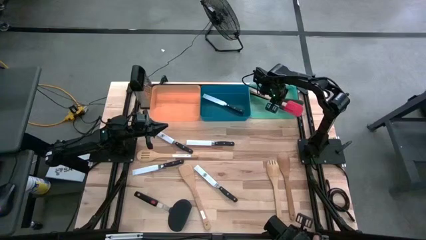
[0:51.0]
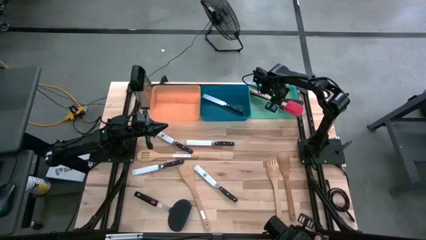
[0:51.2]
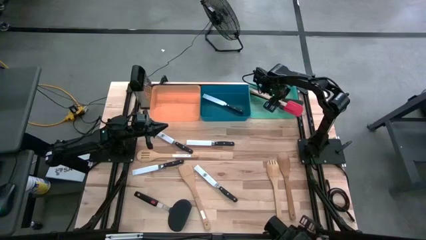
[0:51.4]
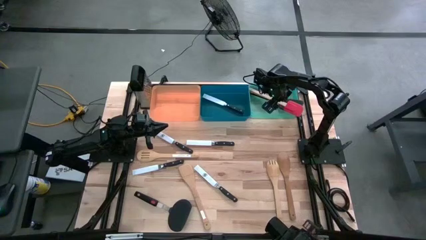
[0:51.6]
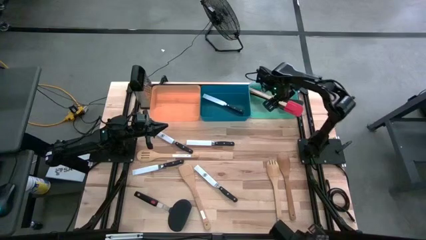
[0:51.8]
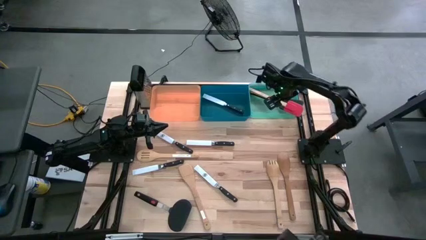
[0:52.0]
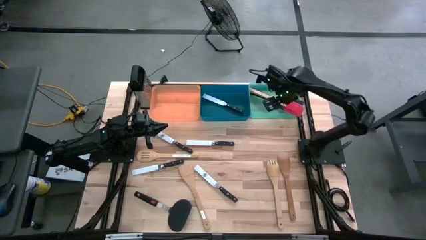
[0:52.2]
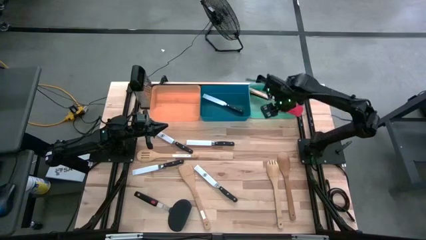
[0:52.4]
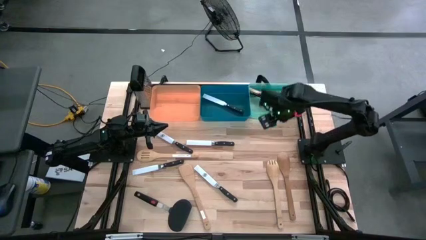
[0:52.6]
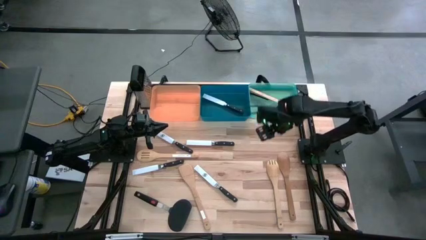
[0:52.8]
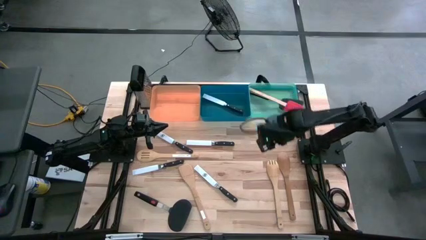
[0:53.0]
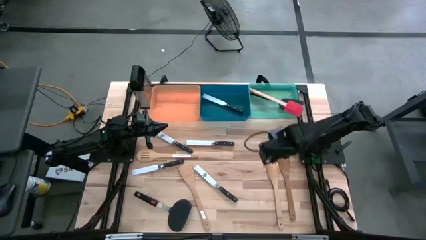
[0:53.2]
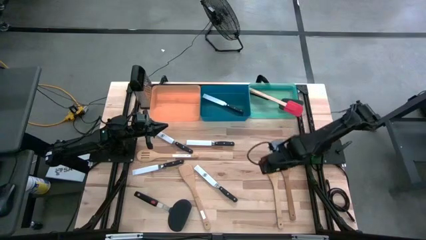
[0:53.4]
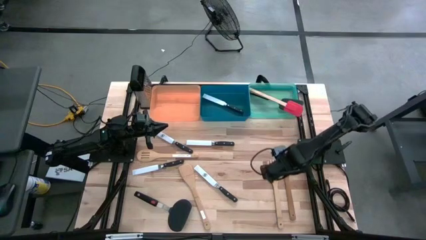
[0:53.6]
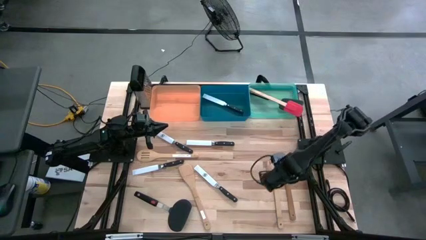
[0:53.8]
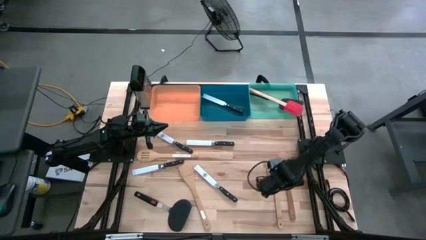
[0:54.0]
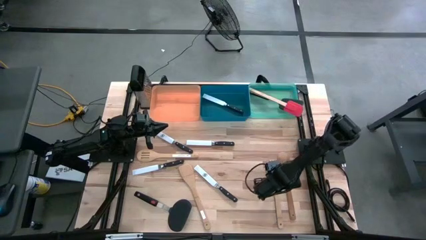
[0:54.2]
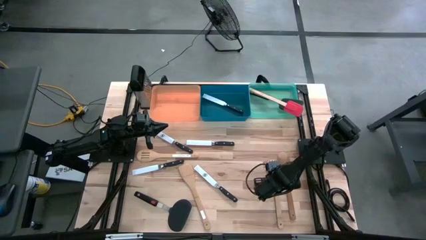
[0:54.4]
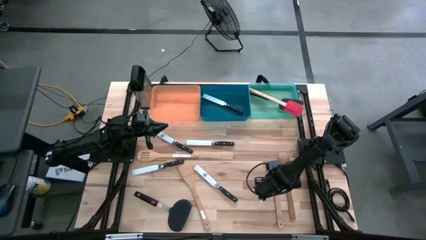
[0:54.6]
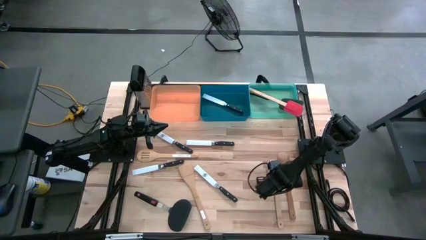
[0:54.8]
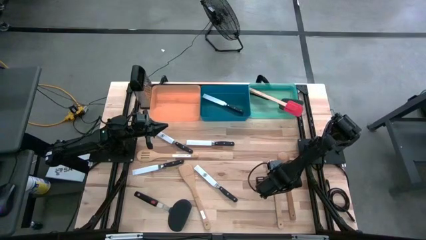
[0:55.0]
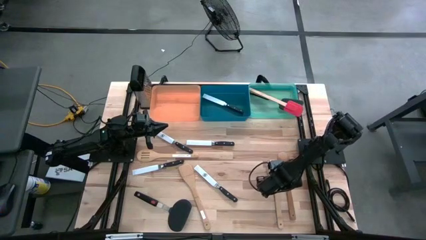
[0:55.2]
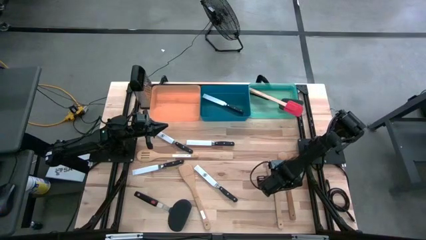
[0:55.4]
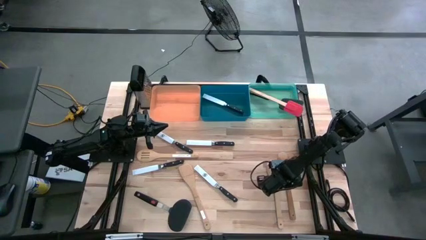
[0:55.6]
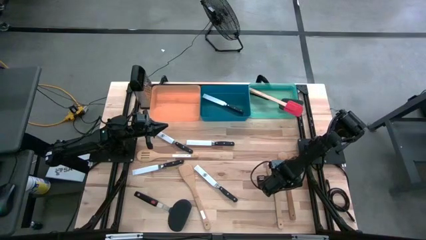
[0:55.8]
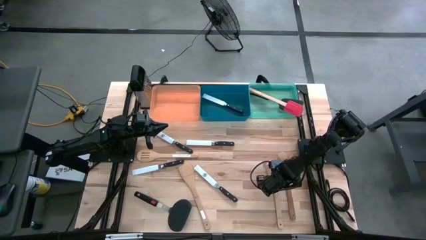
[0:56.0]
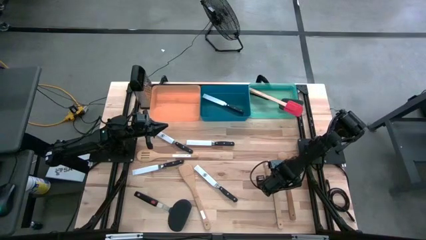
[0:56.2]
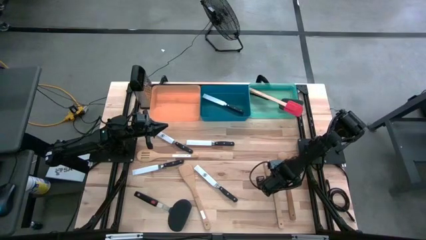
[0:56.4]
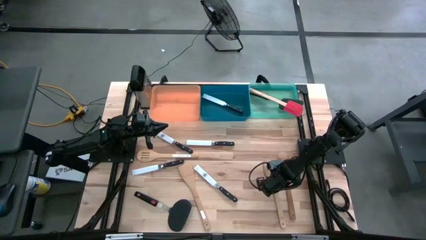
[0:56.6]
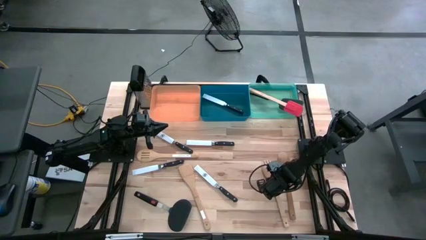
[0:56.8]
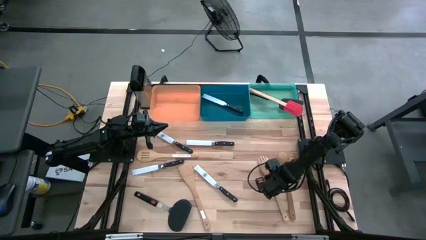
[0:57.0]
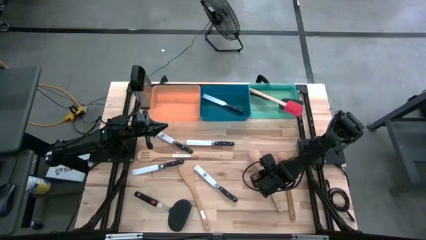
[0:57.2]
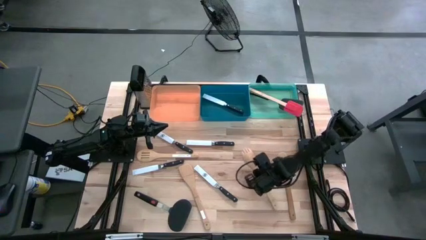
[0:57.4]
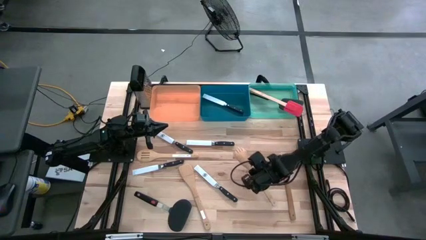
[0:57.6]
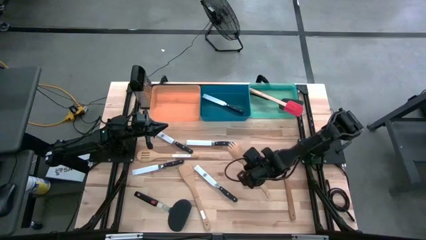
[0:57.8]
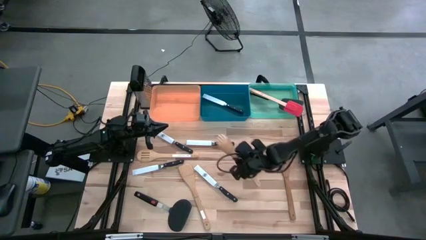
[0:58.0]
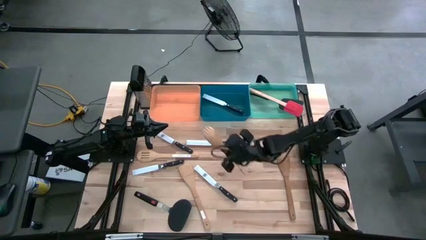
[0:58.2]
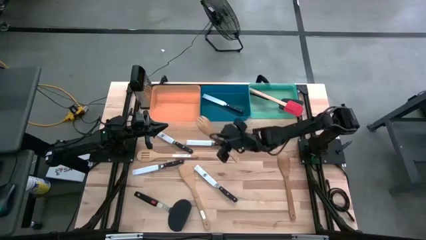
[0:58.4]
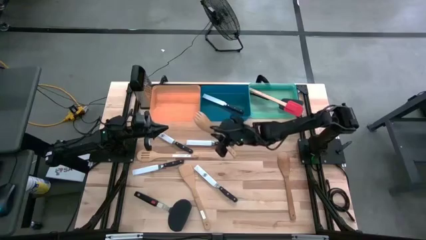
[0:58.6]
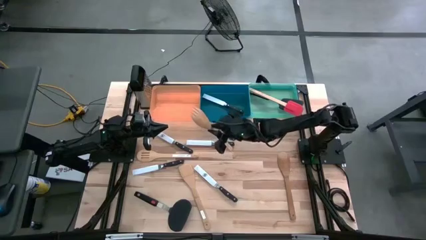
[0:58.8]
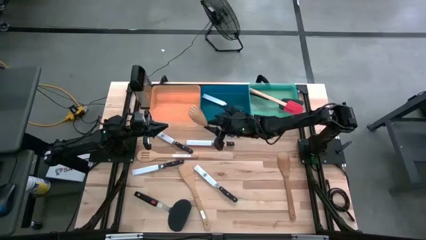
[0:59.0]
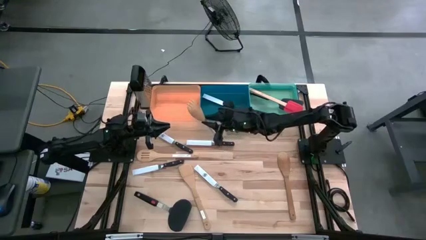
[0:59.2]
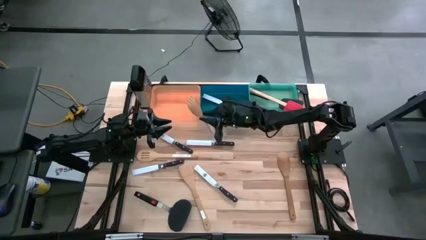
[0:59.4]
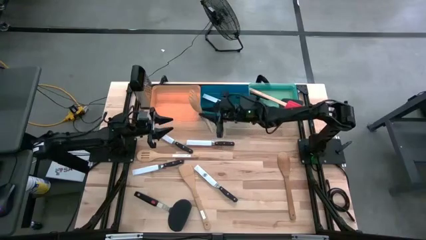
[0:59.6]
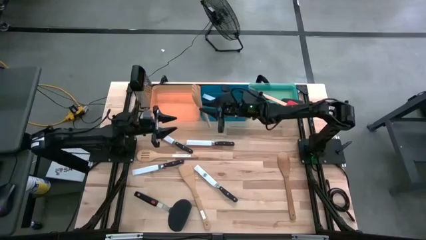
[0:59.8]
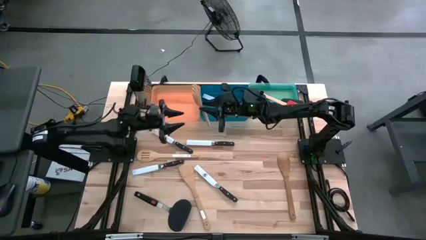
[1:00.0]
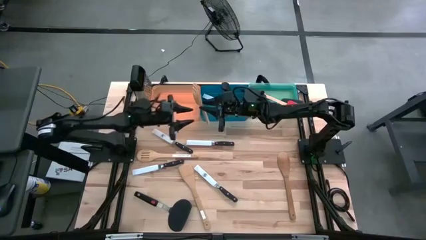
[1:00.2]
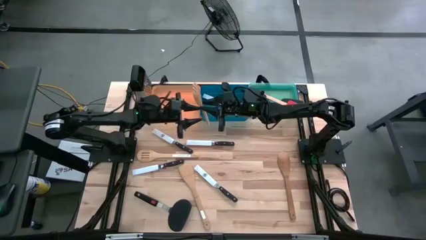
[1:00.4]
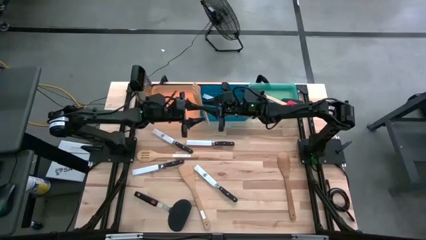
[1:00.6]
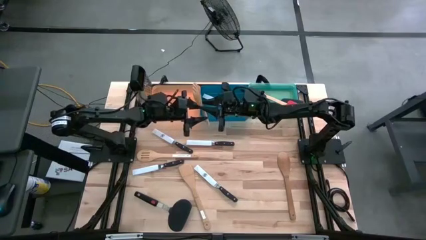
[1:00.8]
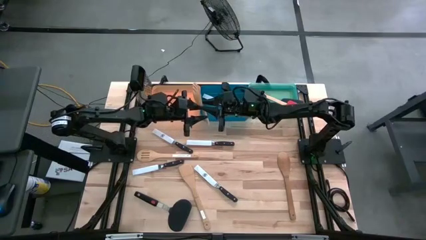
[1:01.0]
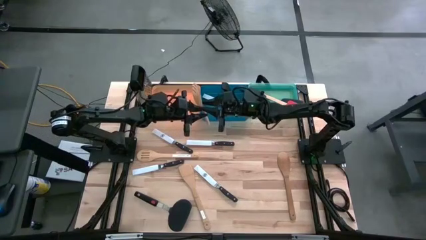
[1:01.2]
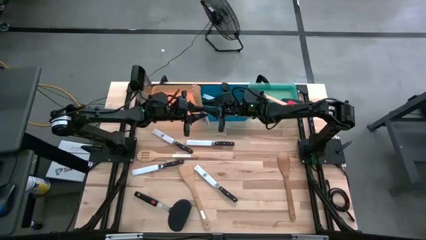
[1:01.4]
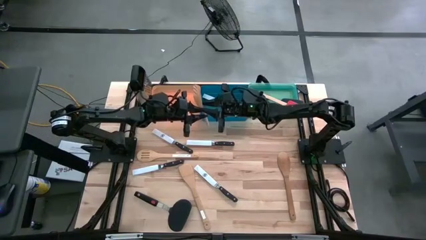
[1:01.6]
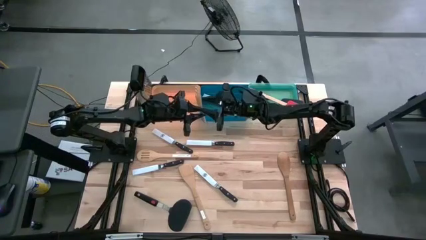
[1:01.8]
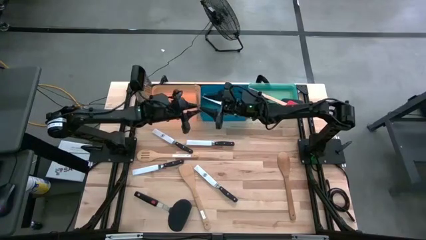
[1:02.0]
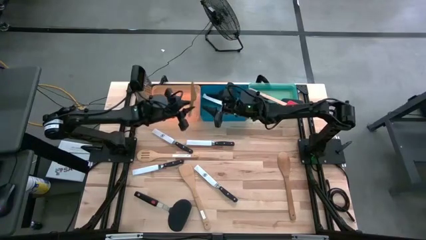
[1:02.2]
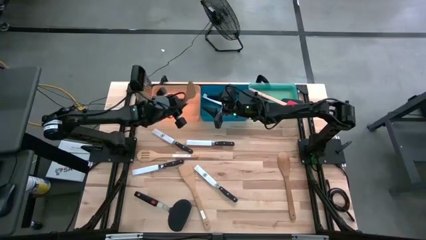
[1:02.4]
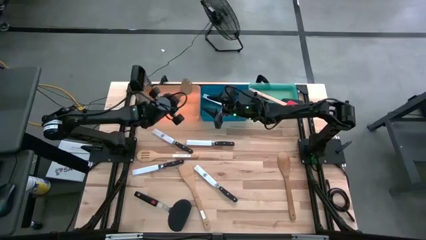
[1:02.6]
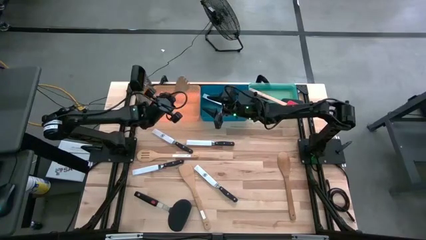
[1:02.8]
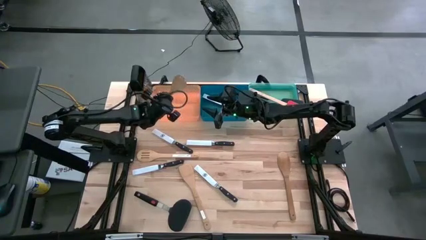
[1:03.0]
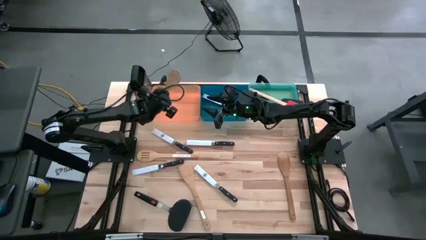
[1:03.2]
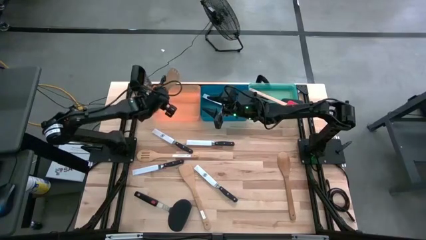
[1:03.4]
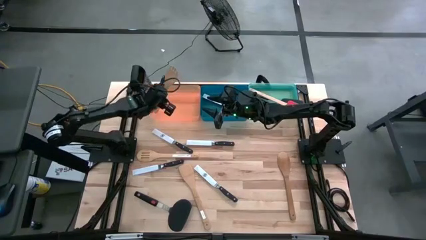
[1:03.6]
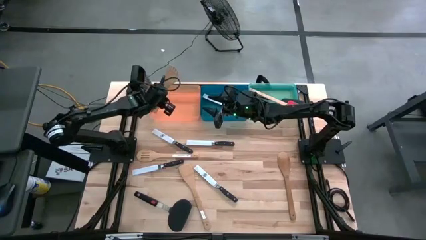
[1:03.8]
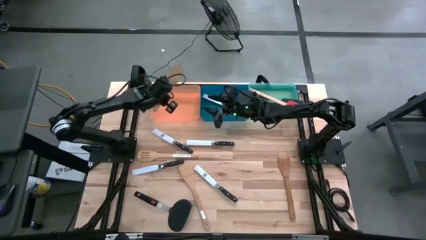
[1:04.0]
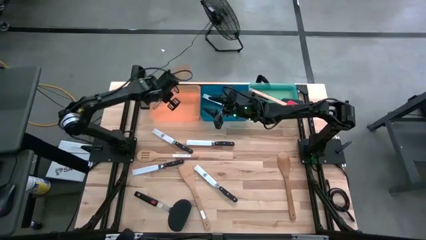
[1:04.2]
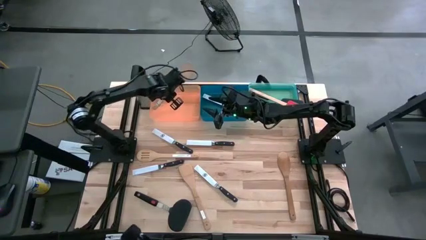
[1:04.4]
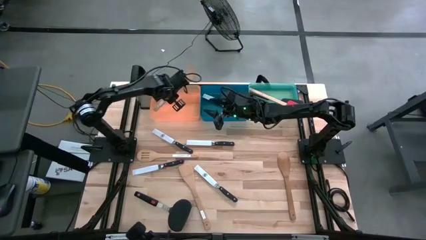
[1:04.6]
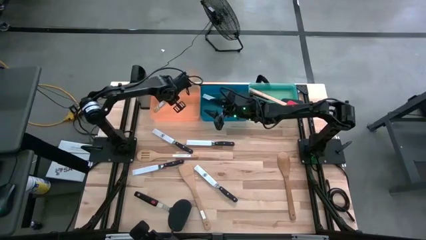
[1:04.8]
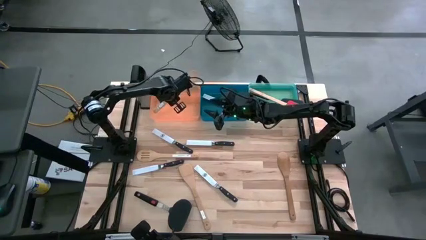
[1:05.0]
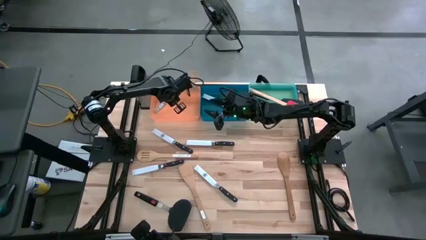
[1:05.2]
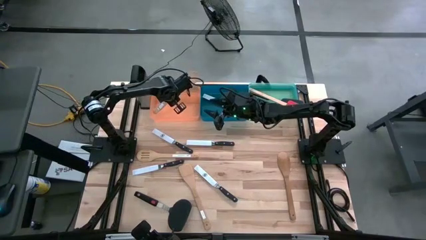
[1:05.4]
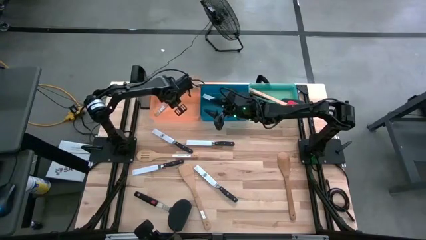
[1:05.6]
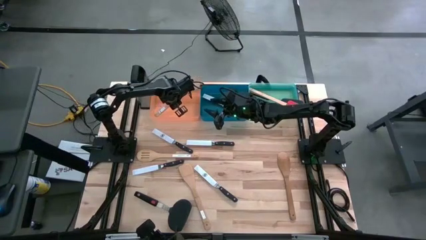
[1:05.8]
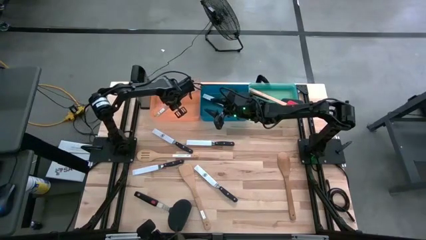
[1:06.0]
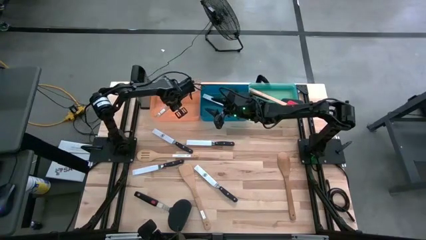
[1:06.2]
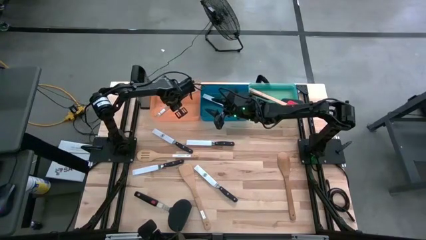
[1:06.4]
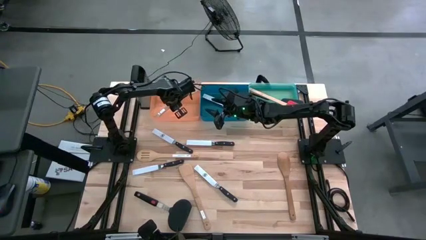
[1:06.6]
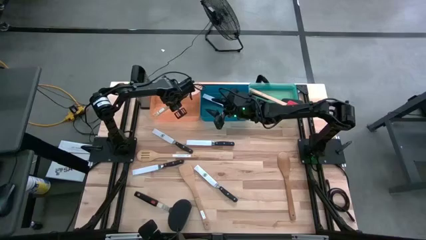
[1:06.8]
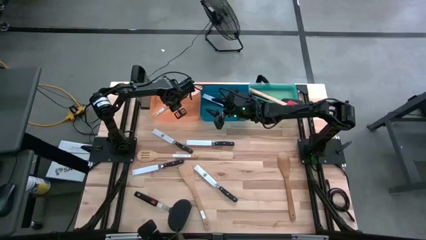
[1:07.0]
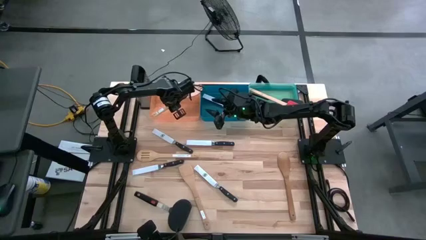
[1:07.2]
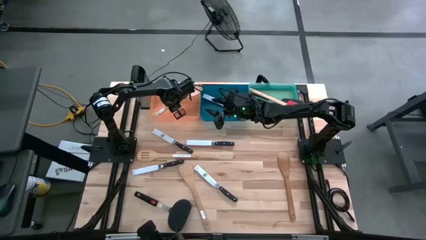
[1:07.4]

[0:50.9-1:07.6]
Task: Pick & Place Kitchen Items
Put the wooden serving spoon into the orange bin
